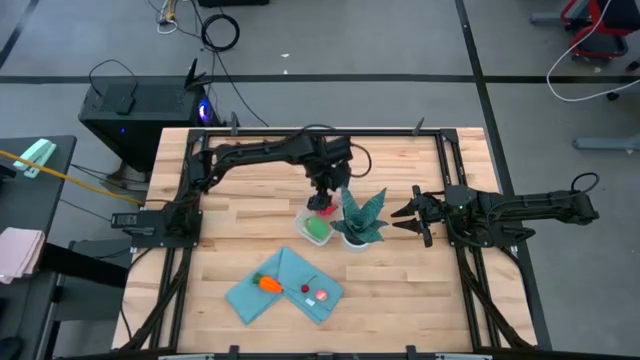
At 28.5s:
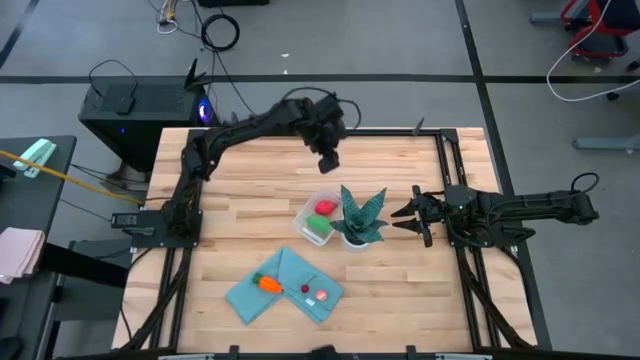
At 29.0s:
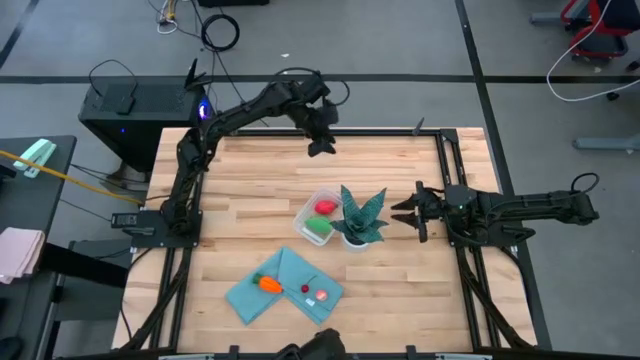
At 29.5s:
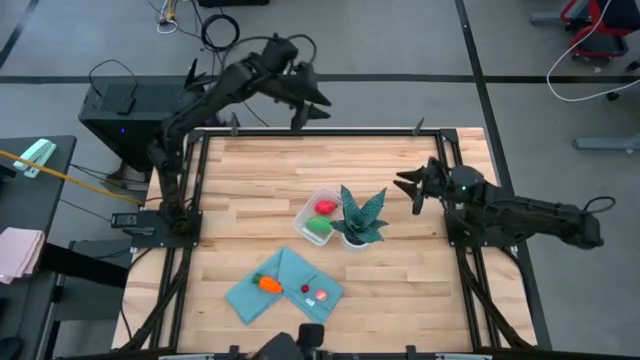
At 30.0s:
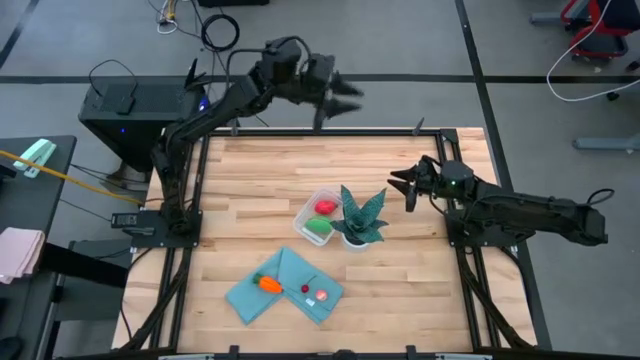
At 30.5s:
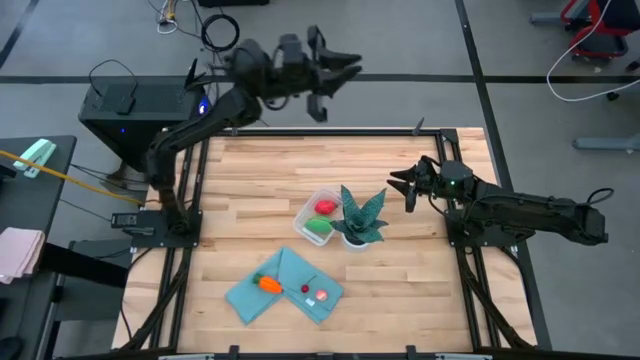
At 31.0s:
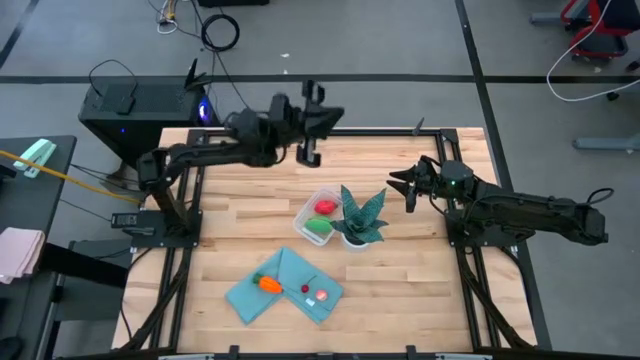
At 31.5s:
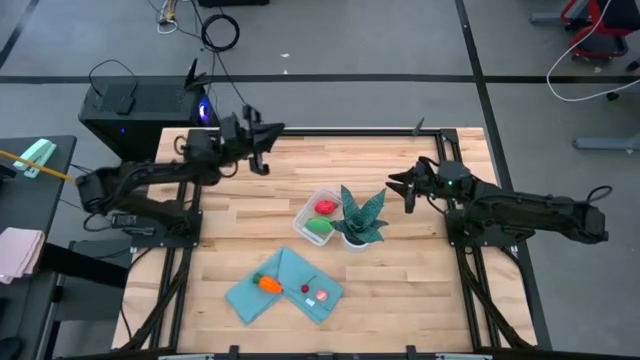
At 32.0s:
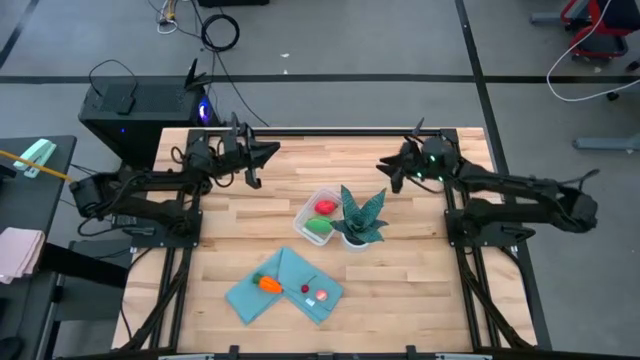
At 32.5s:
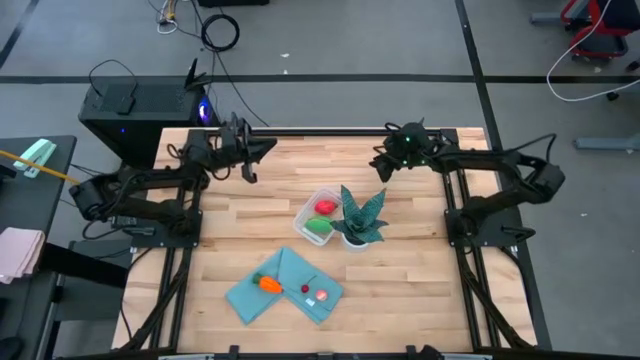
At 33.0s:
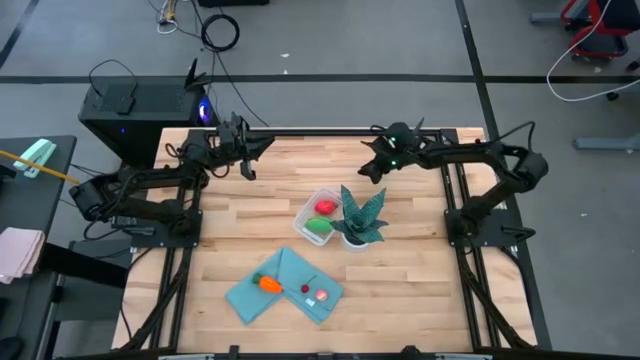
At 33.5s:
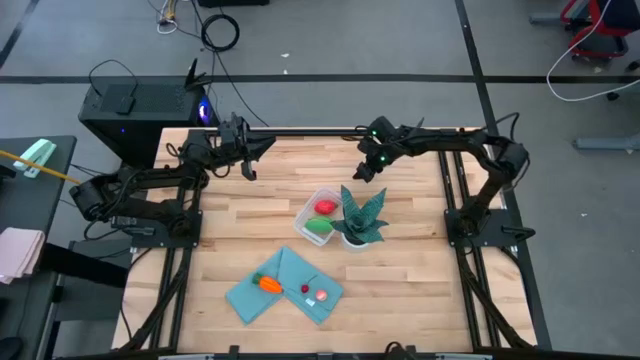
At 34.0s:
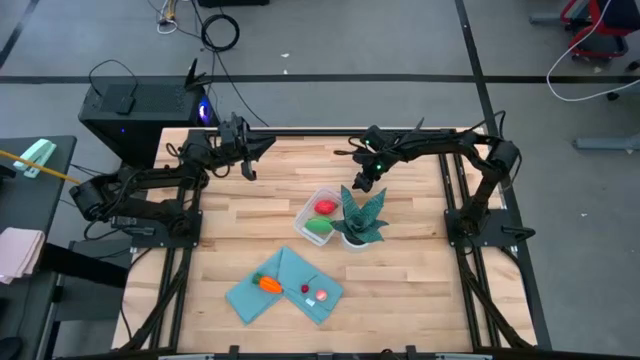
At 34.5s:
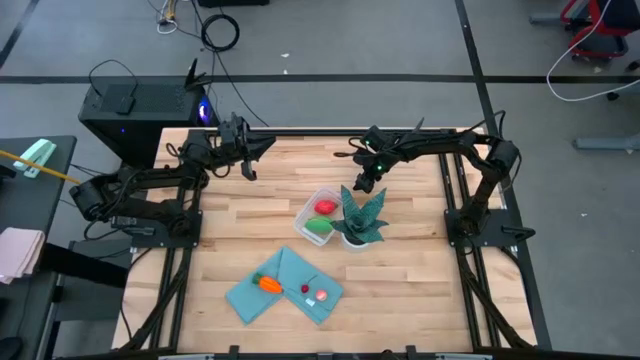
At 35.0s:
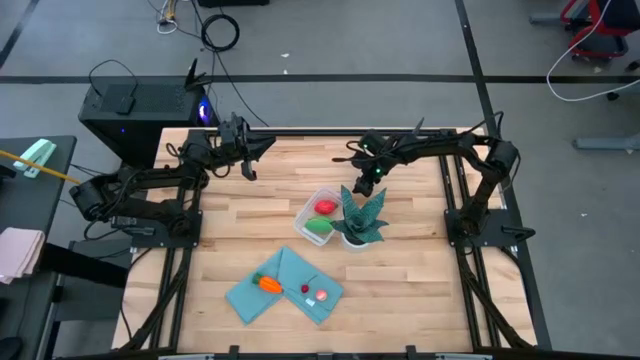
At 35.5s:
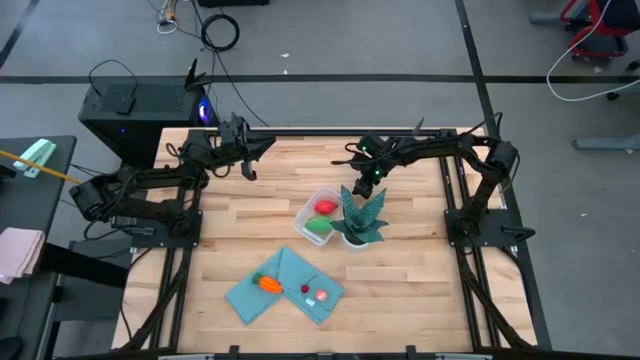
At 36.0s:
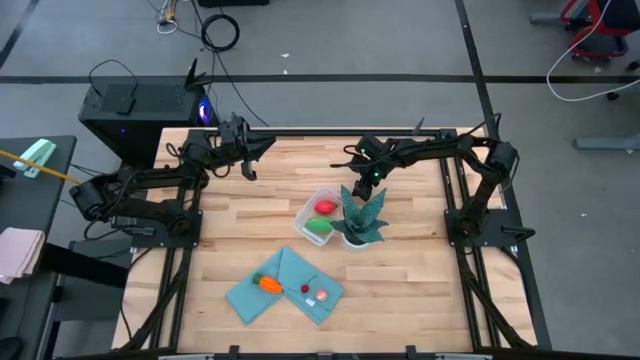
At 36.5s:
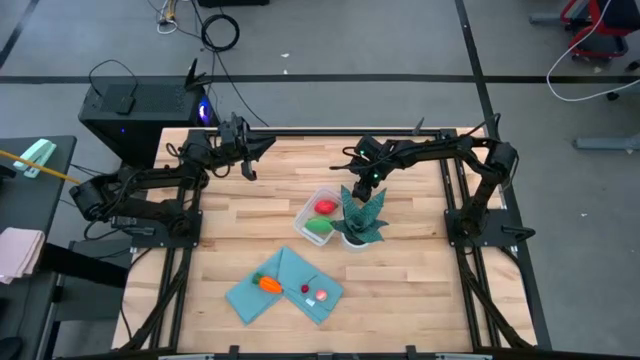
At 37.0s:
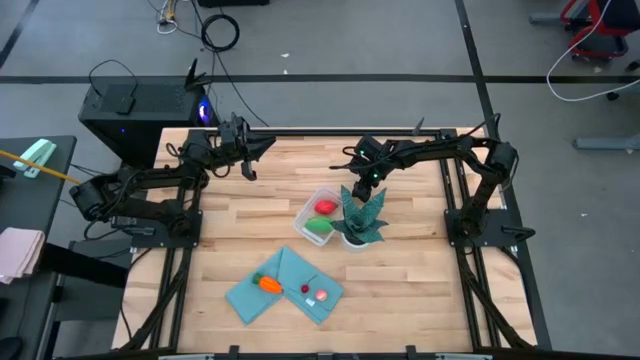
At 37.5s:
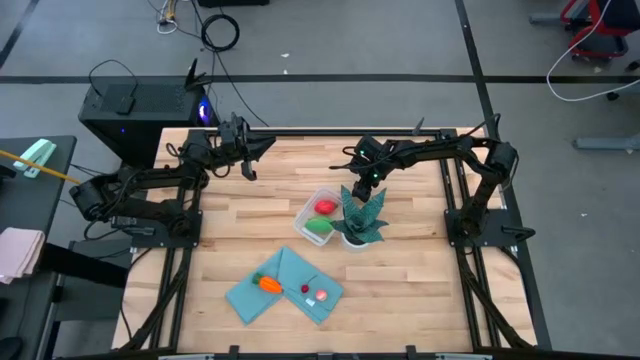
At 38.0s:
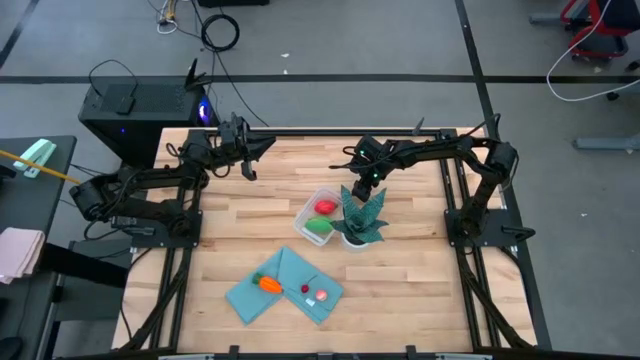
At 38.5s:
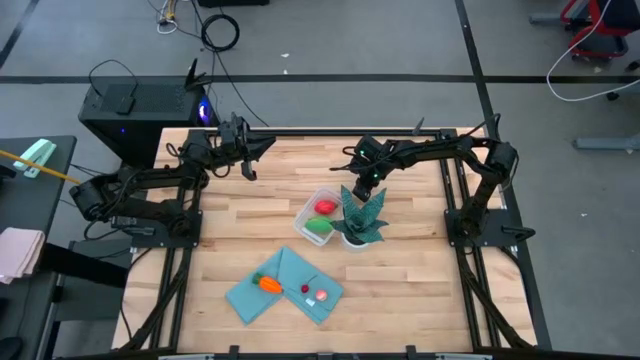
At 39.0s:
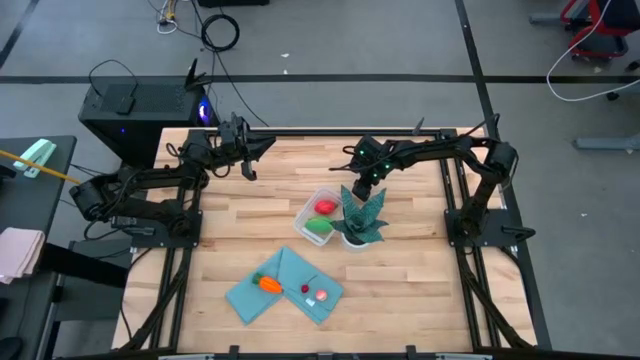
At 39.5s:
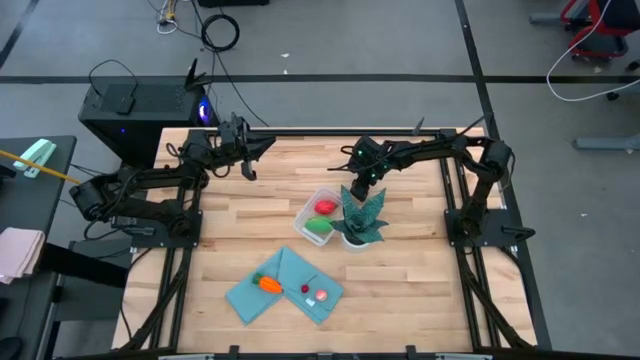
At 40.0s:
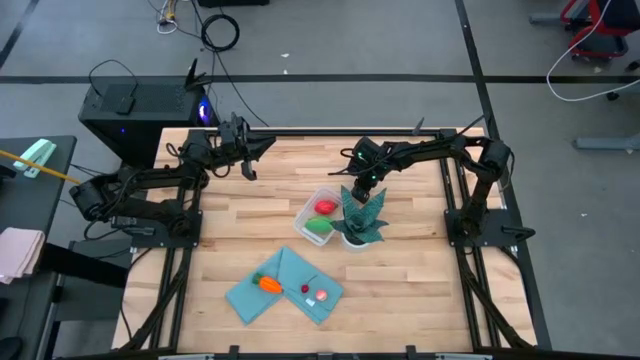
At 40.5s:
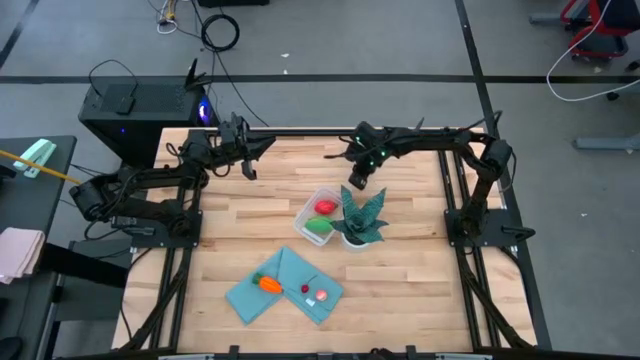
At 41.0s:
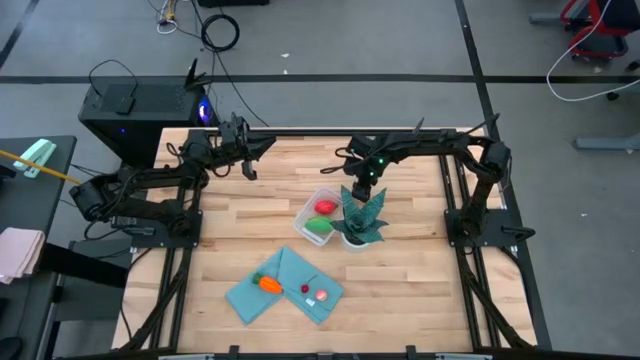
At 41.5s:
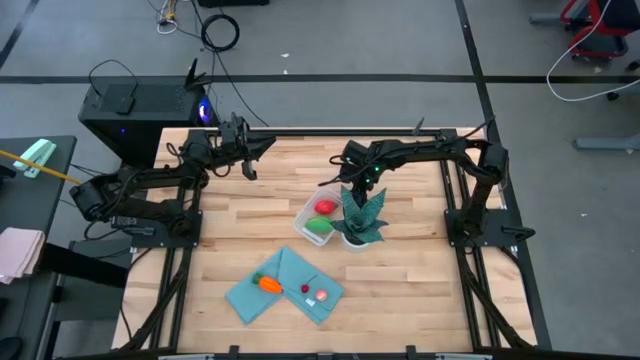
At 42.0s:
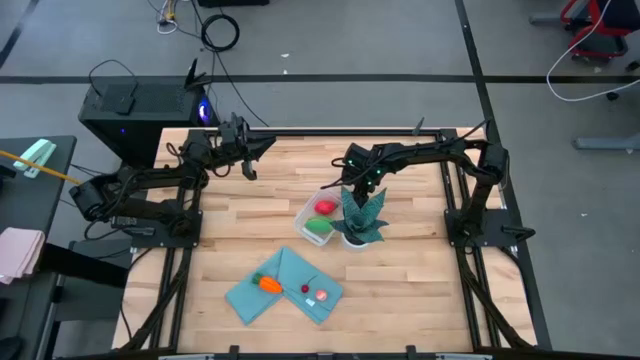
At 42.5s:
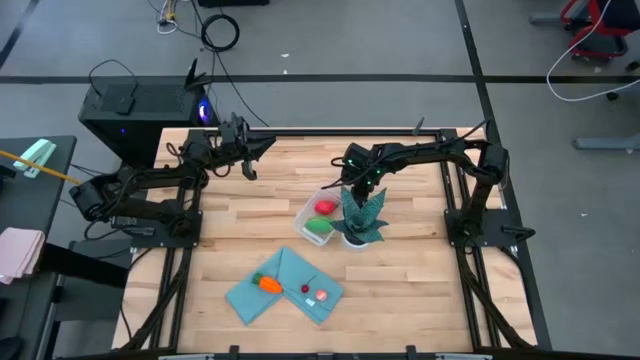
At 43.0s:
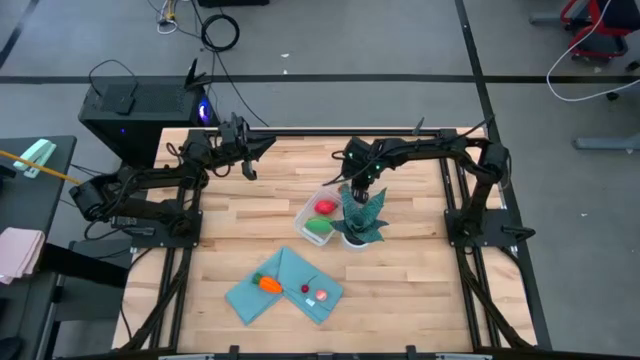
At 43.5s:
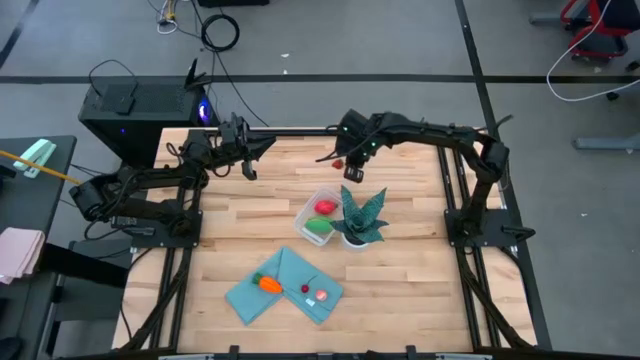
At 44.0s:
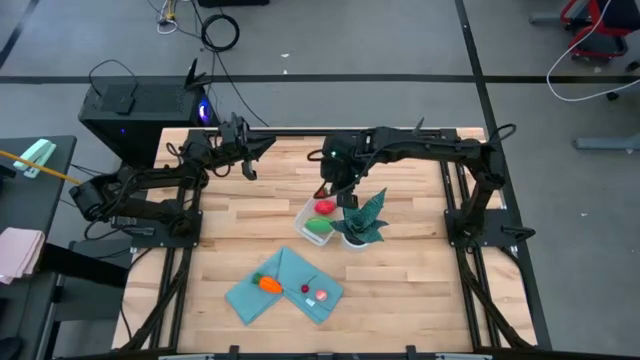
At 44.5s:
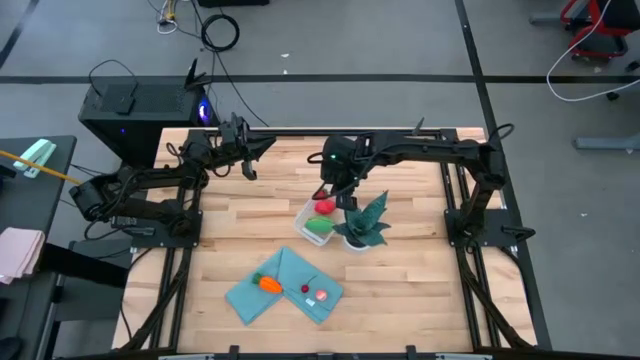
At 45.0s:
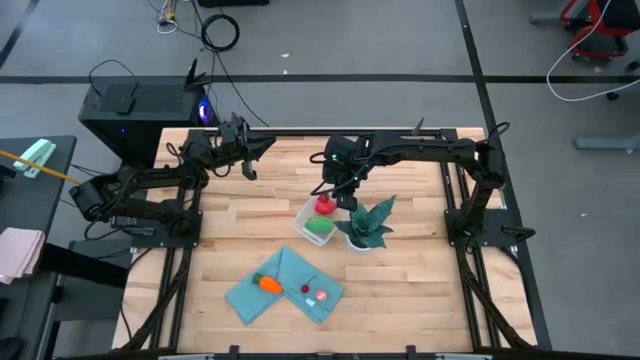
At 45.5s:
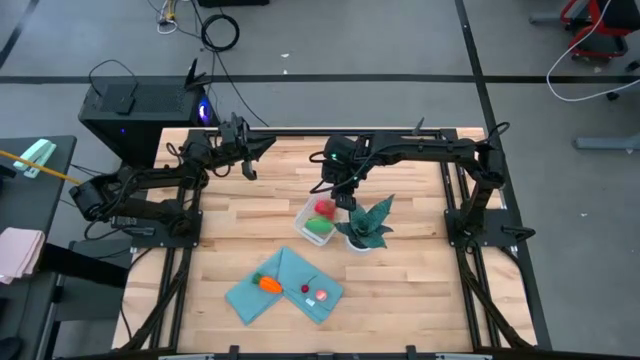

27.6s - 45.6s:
Task: Pick and placing Produce into tupperware
Put the strawberry into the container
